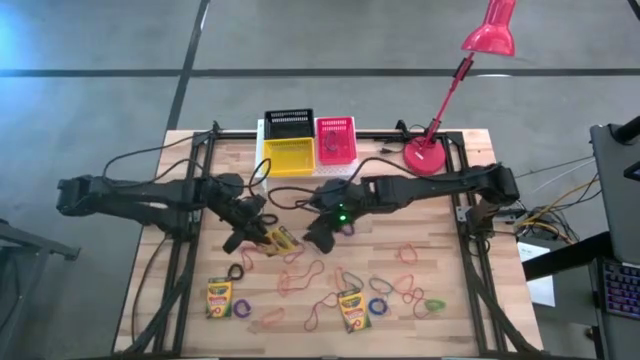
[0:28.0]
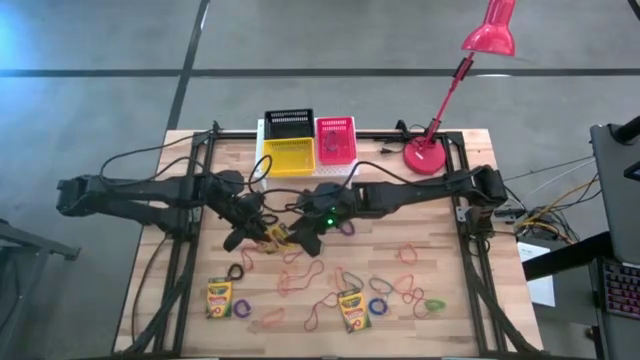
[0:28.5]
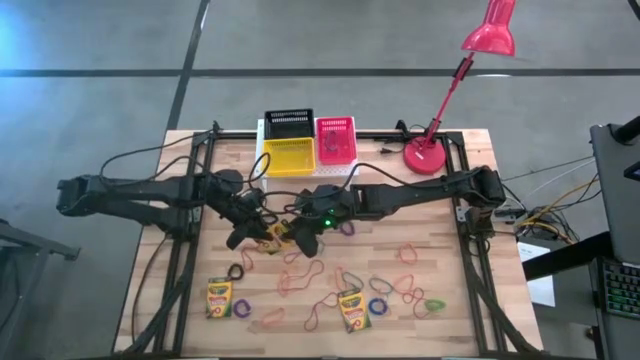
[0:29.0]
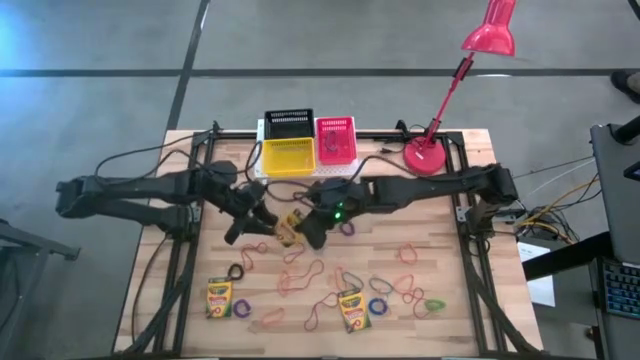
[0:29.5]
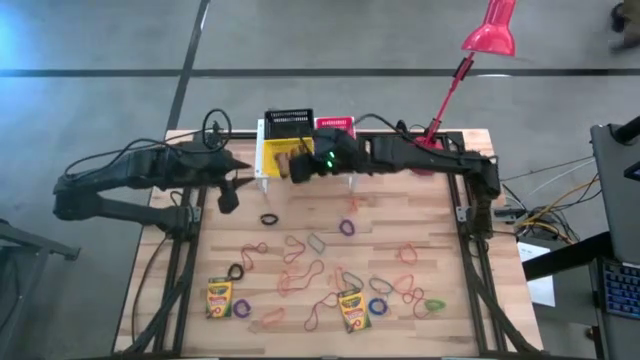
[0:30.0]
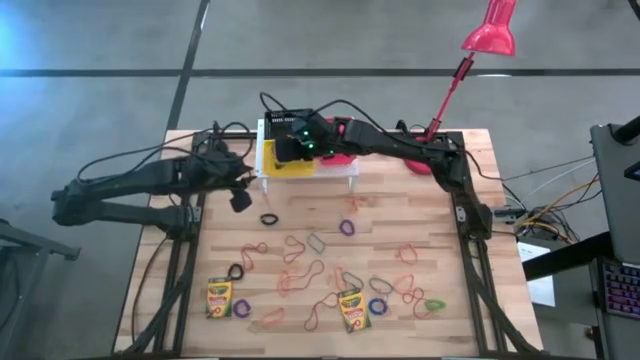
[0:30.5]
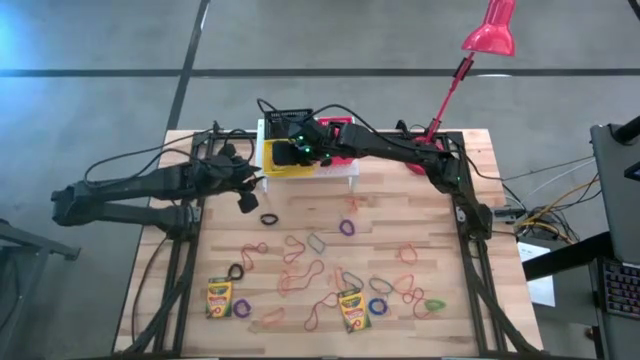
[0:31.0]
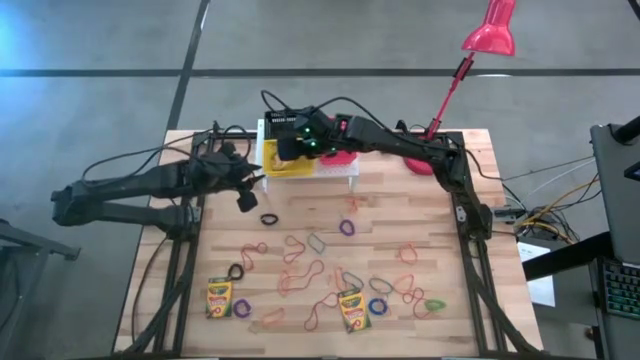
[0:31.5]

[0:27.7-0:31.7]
Task: Pick & Place Office Desk Supplies
Put the yellow crayon box into the yellow basket on the shelf

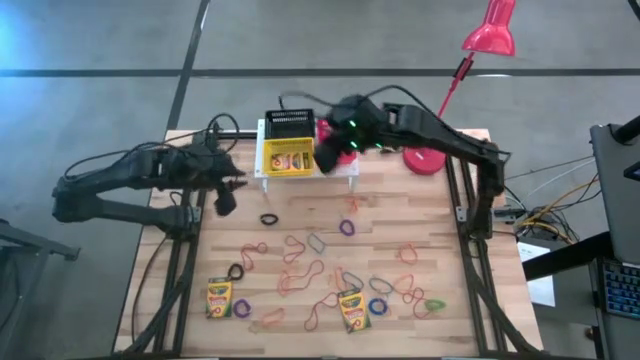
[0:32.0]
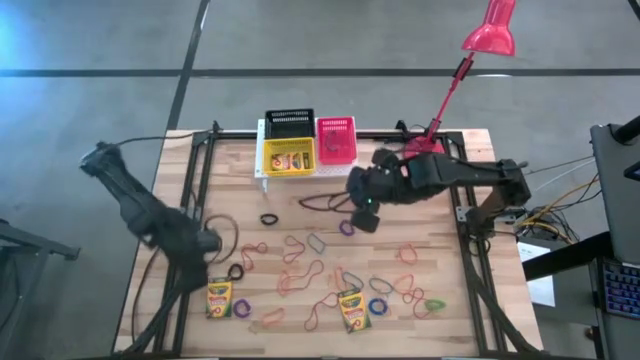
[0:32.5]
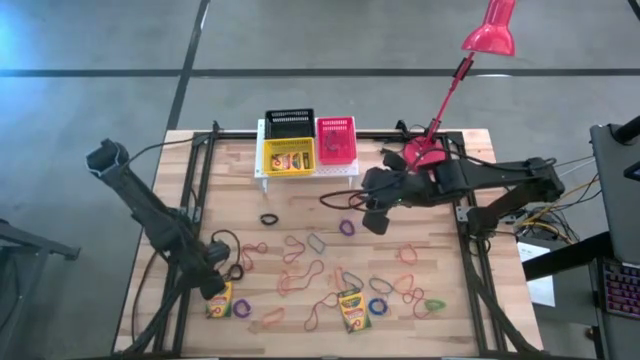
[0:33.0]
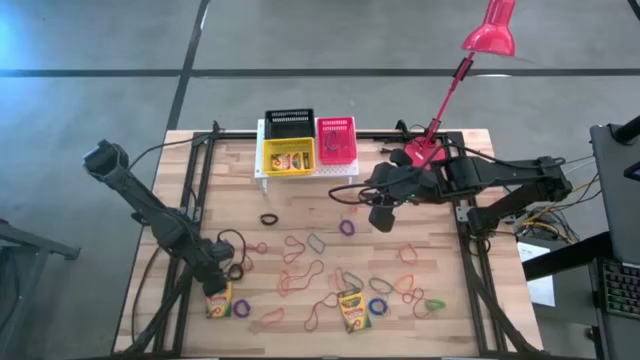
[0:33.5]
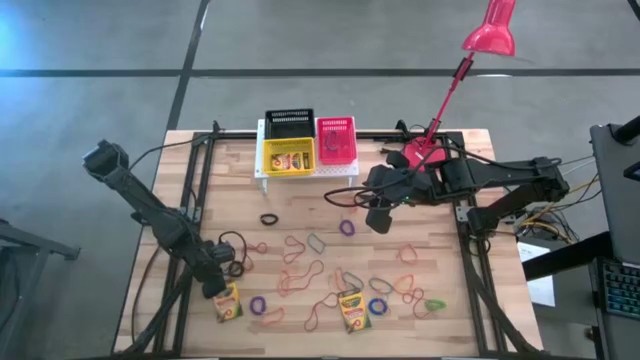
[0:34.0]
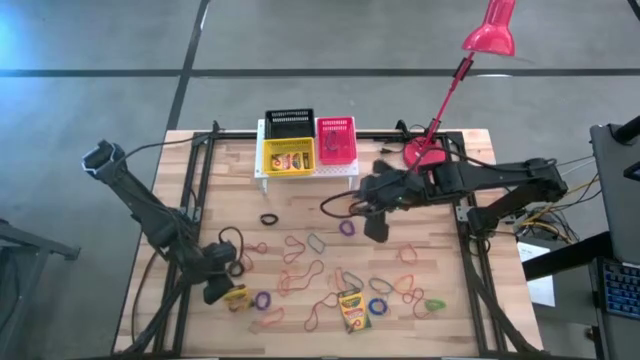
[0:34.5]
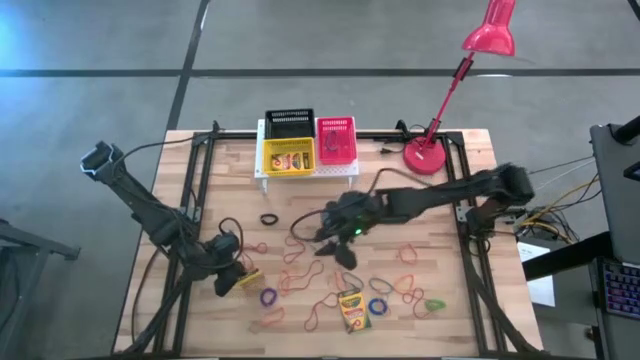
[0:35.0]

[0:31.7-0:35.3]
Put the yellow crayon box into the yellow basket on the shelf

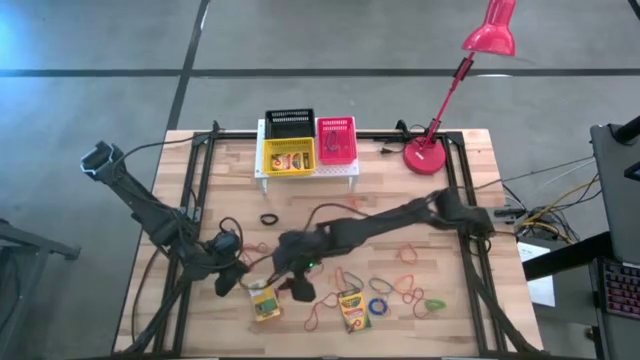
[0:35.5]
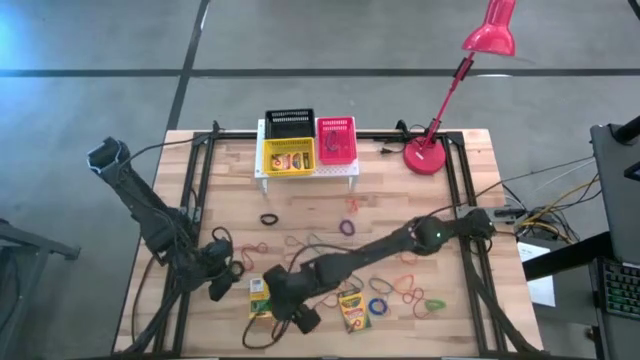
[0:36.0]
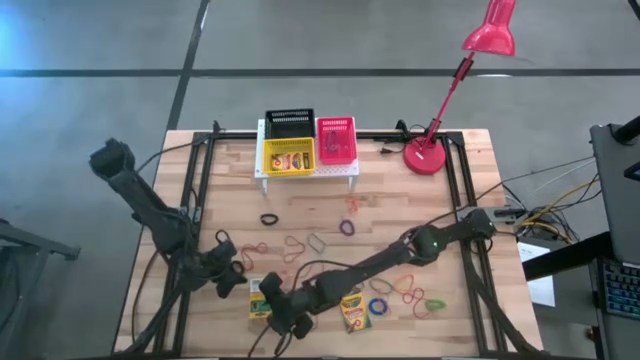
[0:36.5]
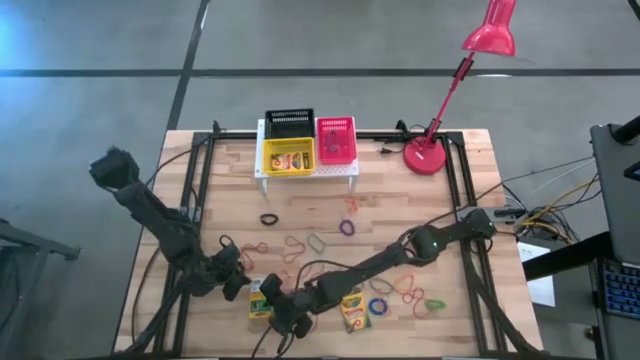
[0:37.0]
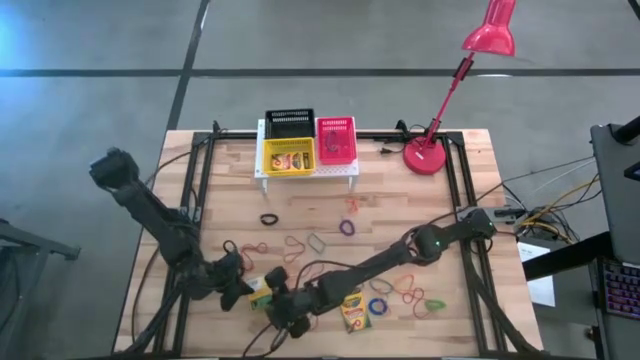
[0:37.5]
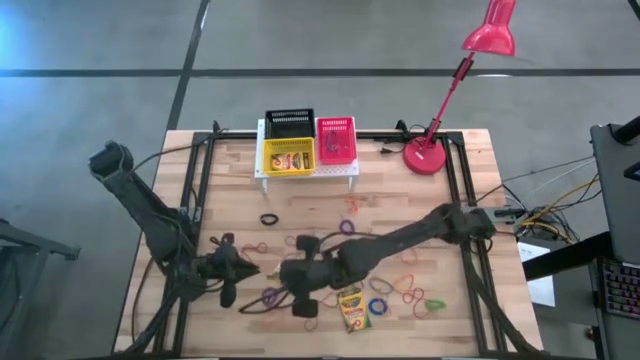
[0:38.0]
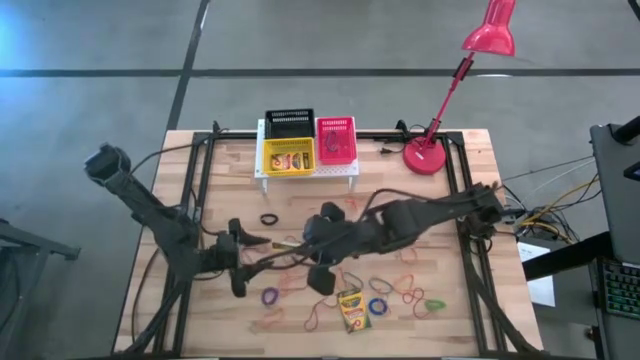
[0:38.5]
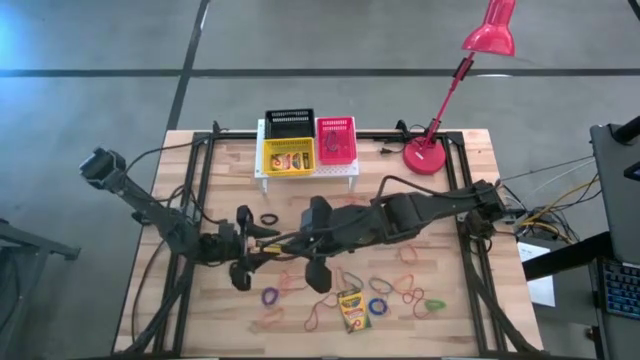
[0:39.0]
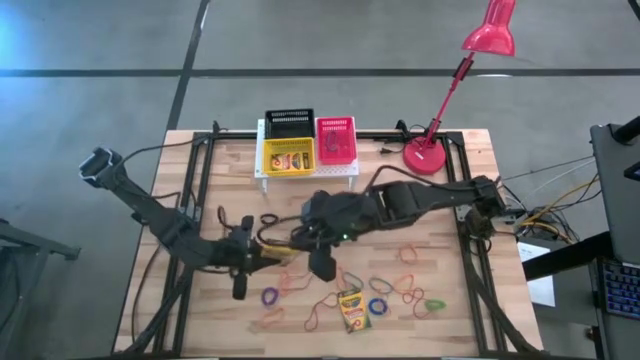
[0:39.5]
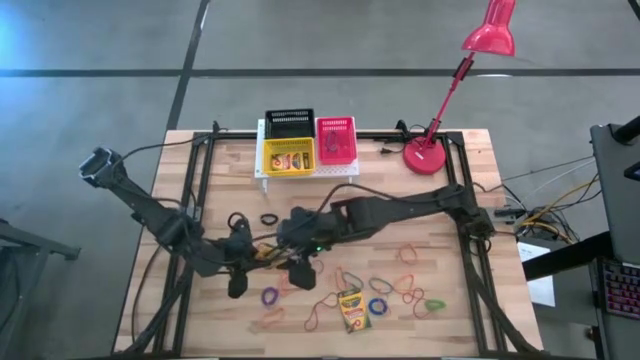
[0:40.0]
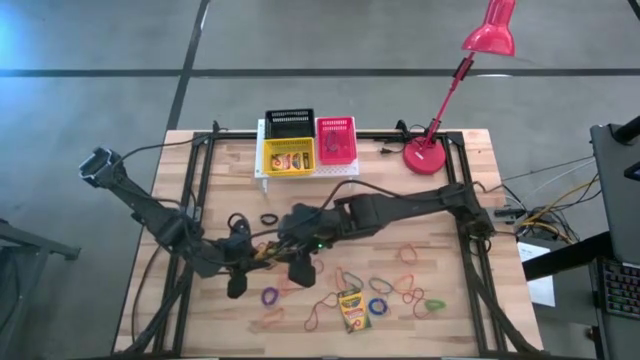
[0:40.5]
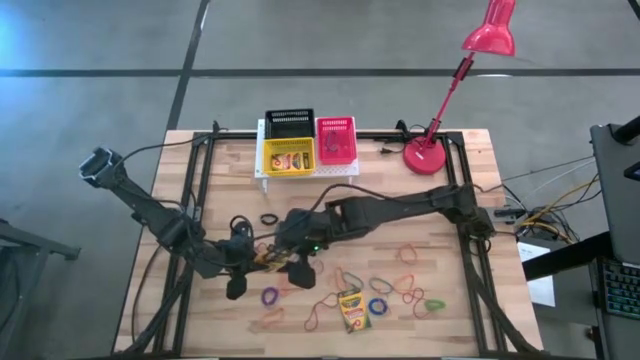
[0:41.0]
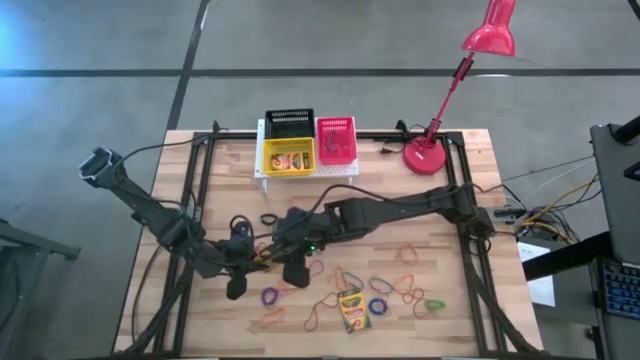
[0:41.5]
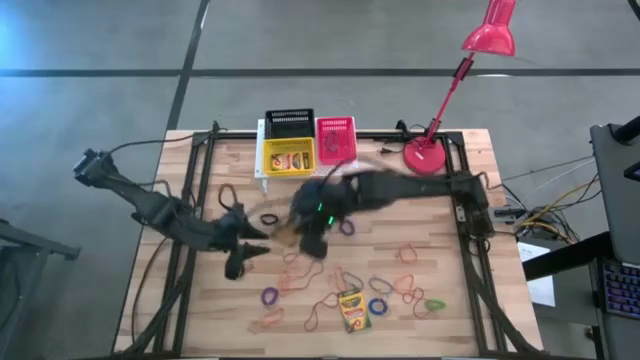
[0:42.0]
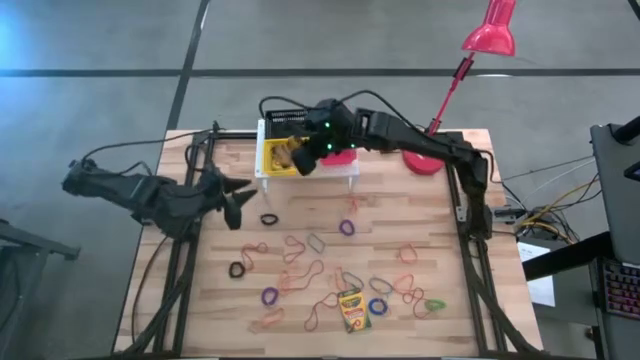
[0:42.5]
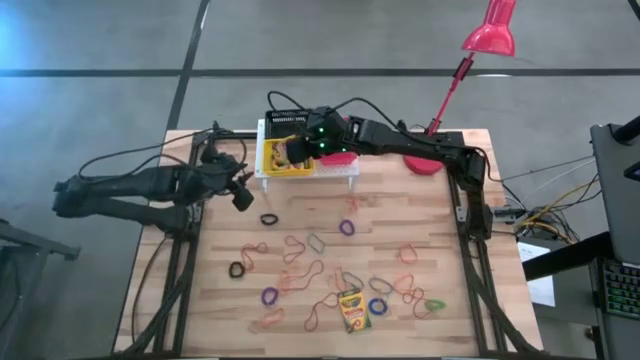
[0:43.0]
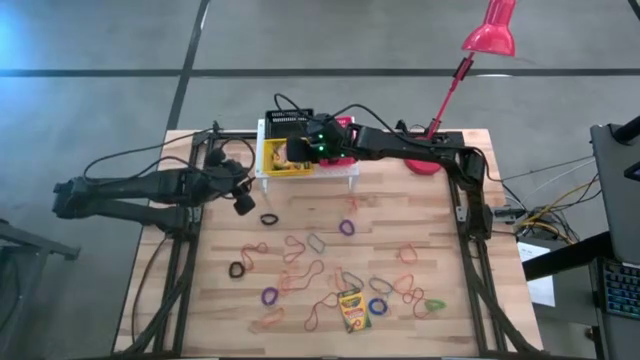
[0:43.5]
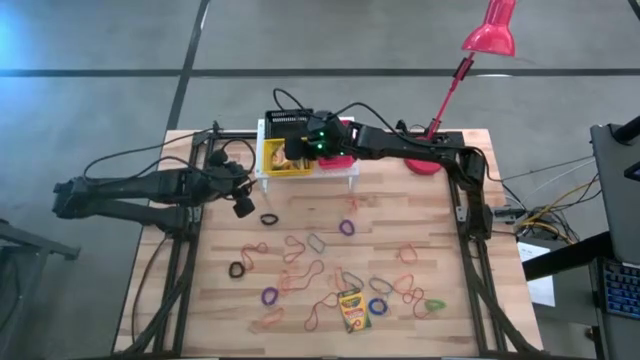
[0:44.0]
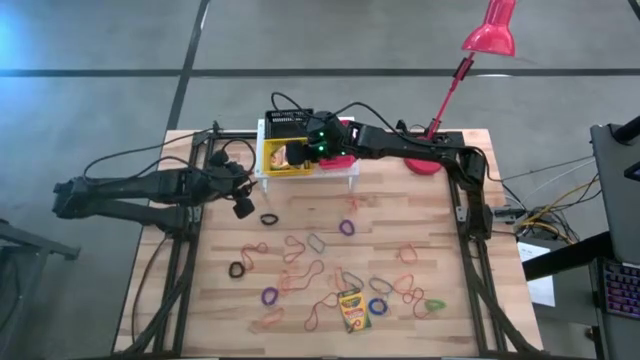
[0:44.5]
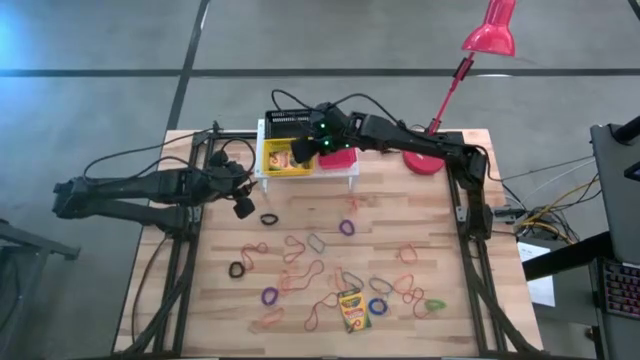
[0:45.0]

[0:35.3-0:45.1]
Put the yellow crayon box into the yellow basket on the shelf

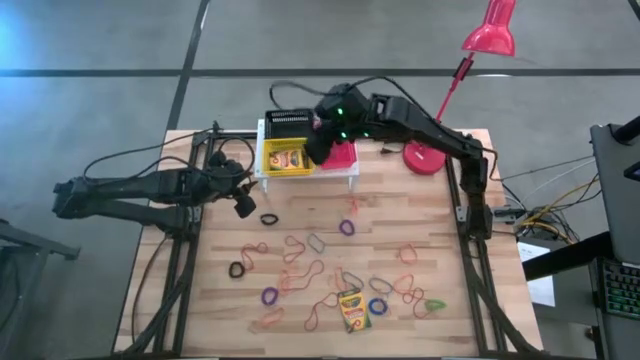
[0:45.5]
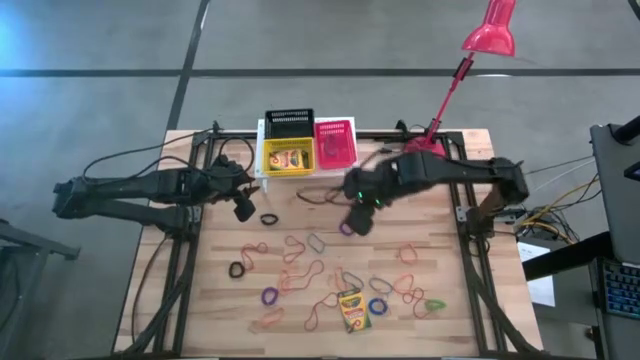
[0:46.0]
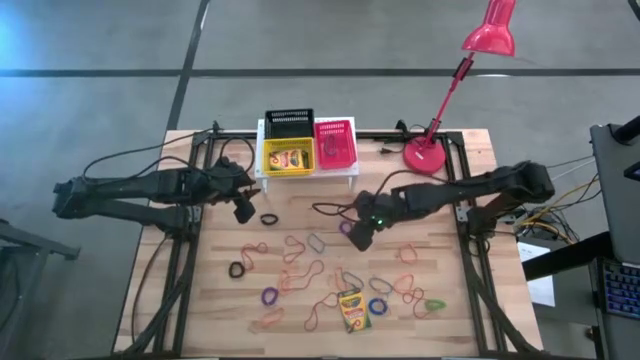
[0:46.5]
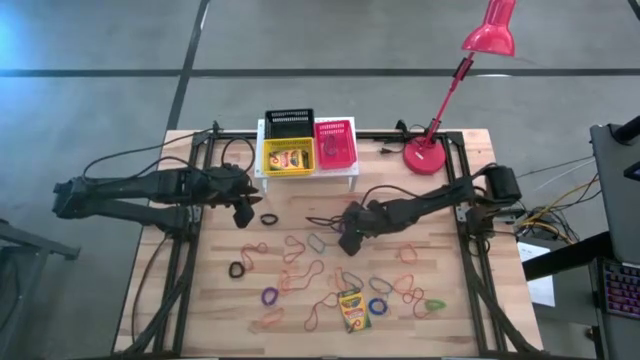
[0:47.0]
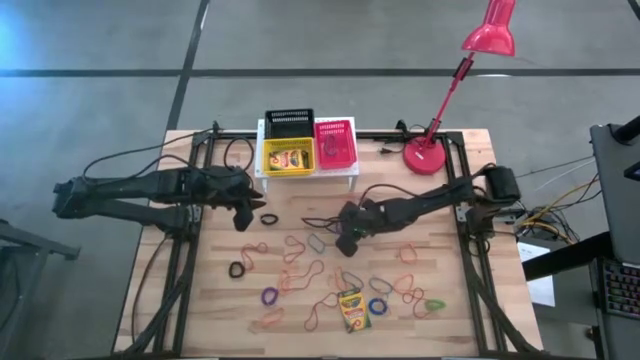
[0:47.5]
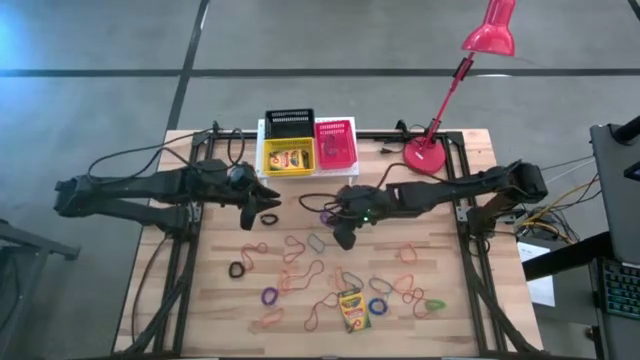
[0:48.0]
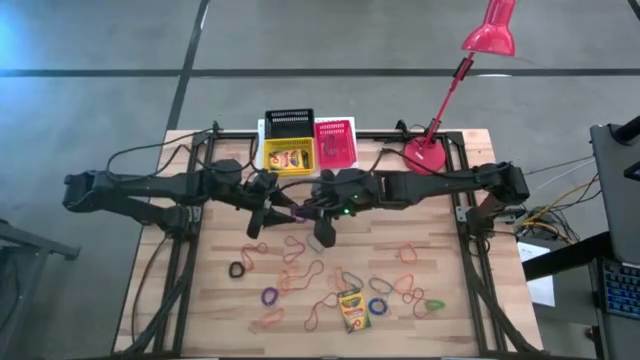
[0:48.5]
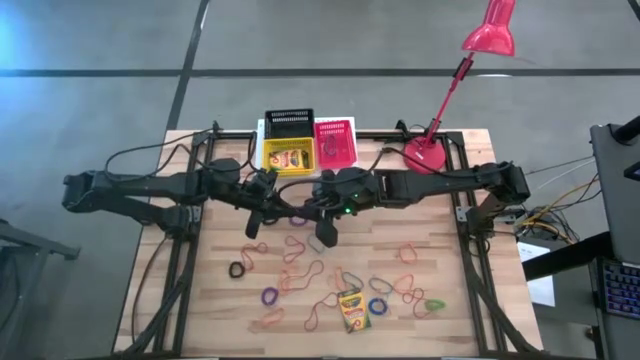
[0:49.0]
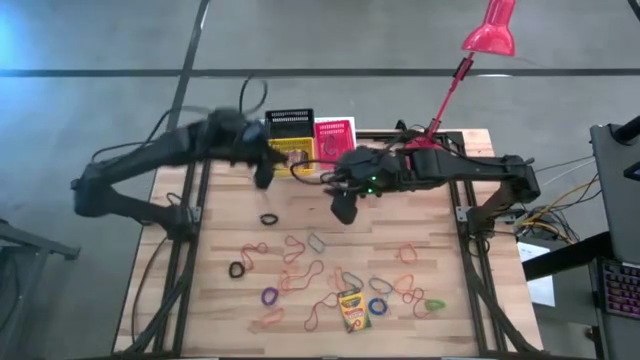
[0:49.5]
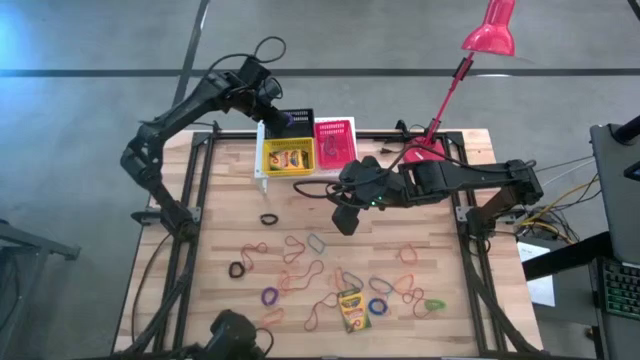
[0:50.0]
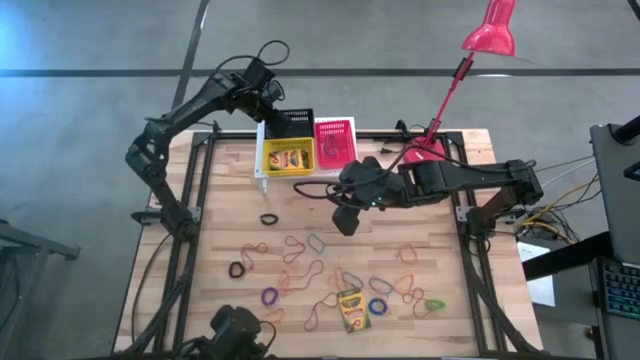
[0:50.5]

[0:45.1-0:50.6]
Put the purple spring keychain into the black basket on the shelf
